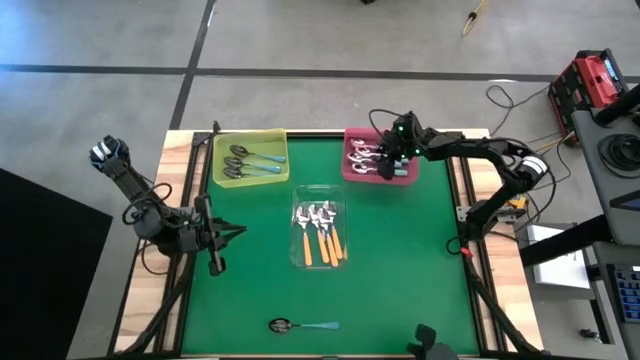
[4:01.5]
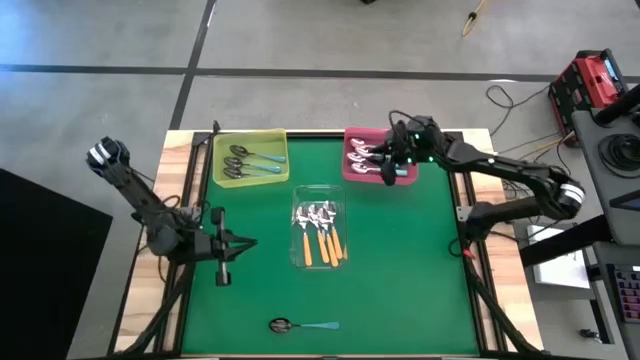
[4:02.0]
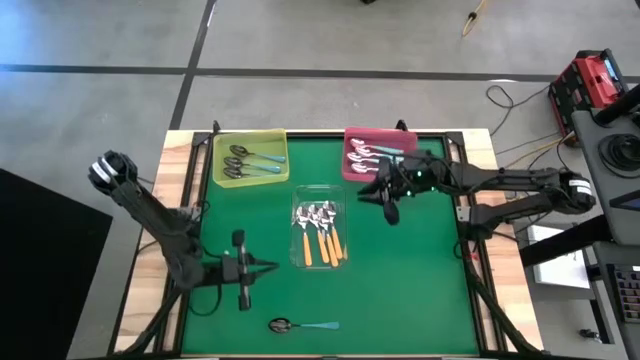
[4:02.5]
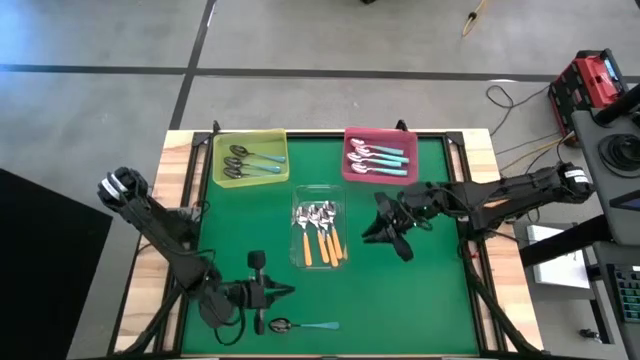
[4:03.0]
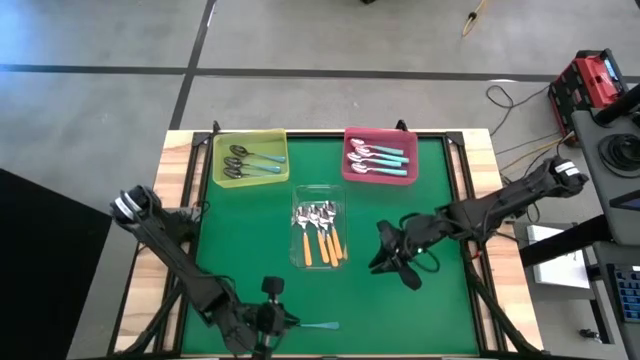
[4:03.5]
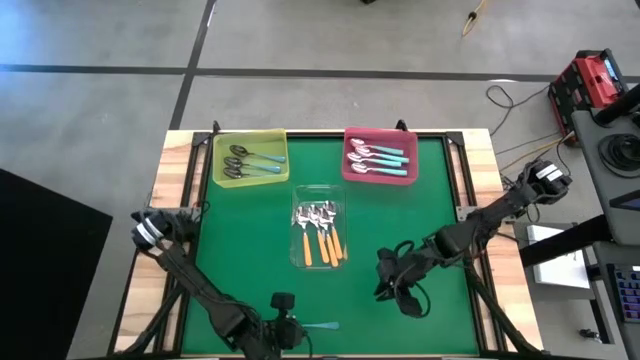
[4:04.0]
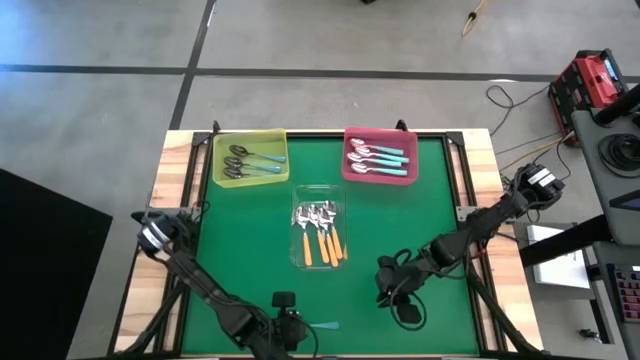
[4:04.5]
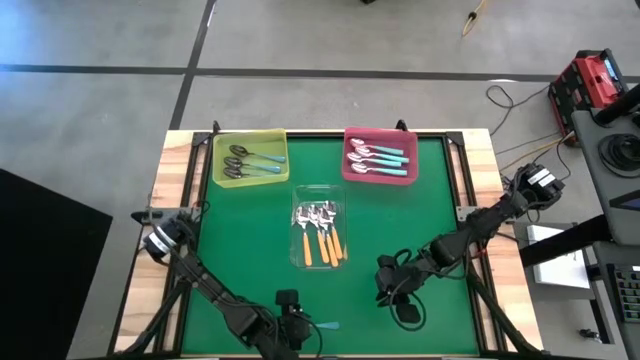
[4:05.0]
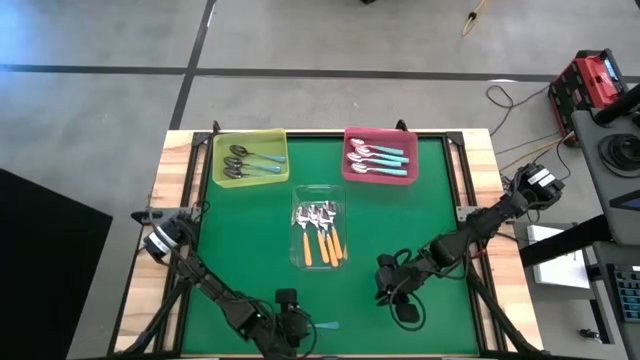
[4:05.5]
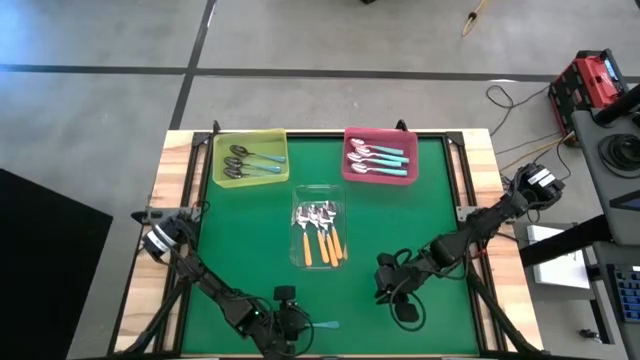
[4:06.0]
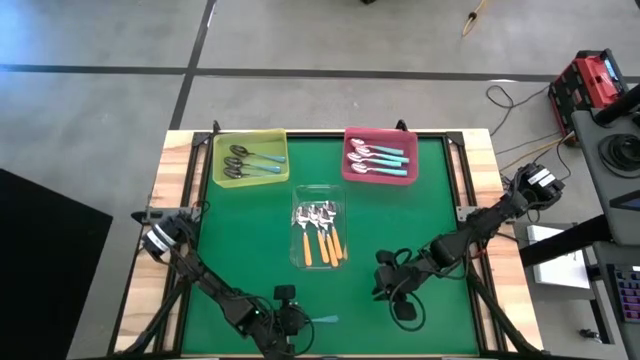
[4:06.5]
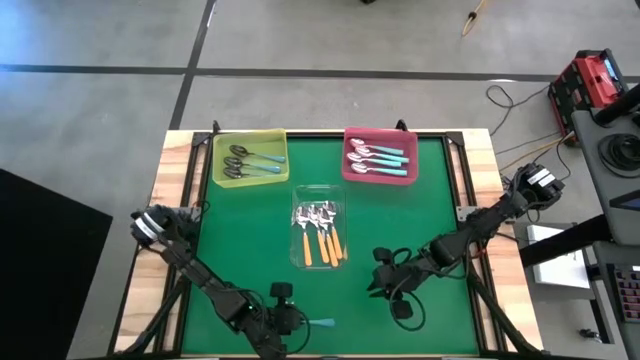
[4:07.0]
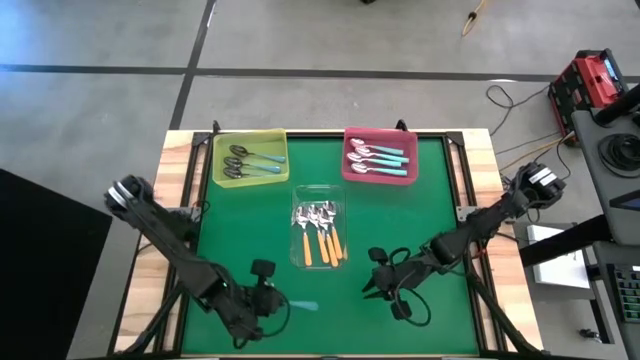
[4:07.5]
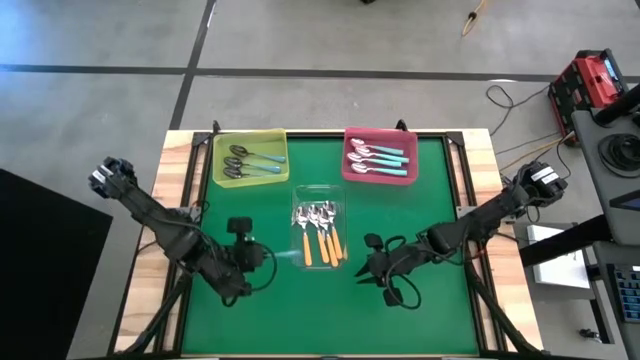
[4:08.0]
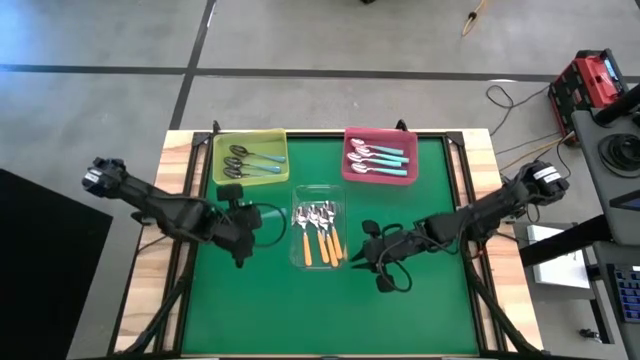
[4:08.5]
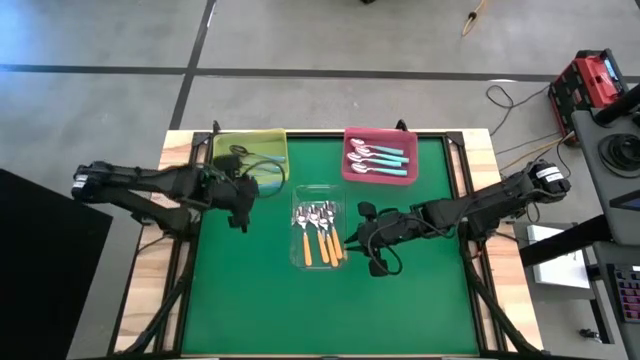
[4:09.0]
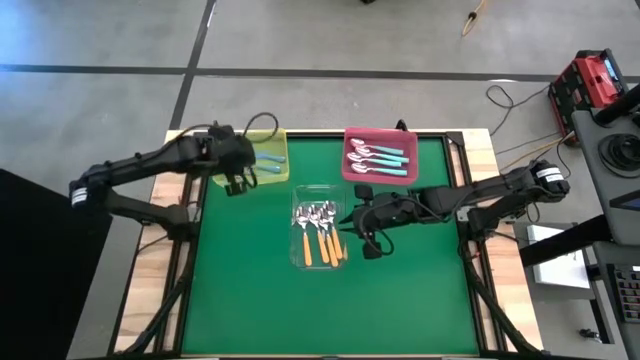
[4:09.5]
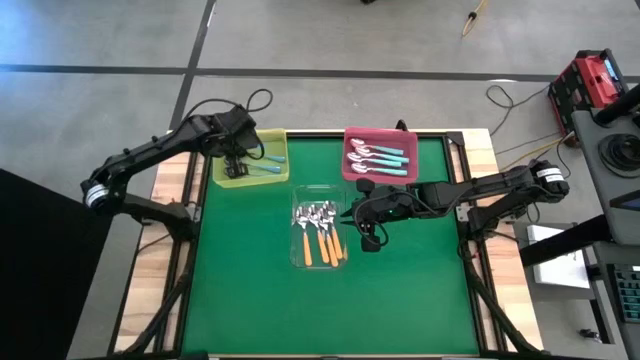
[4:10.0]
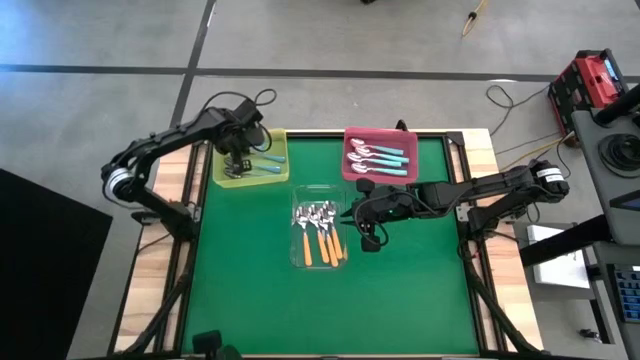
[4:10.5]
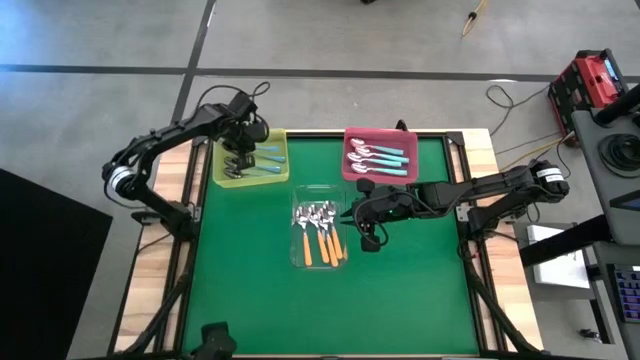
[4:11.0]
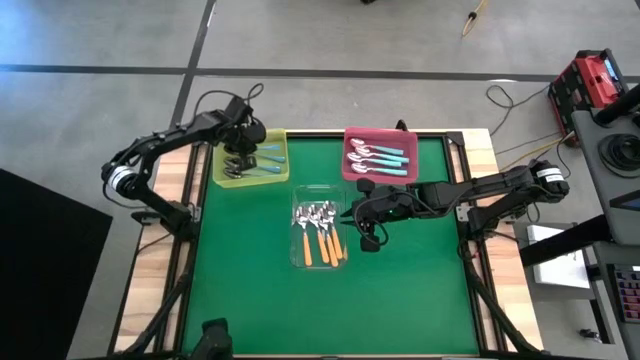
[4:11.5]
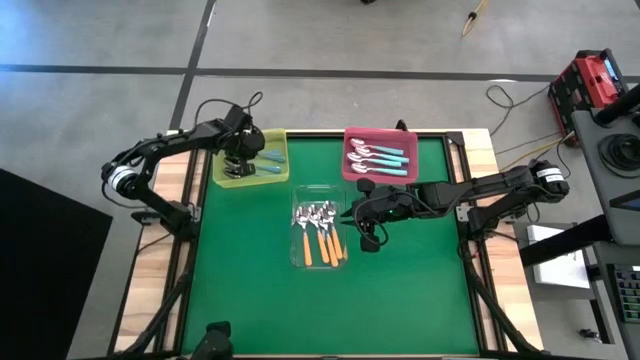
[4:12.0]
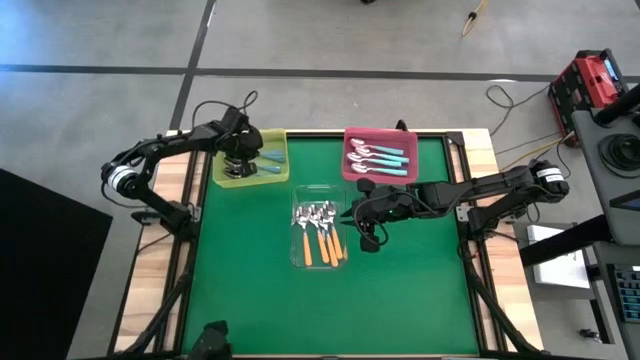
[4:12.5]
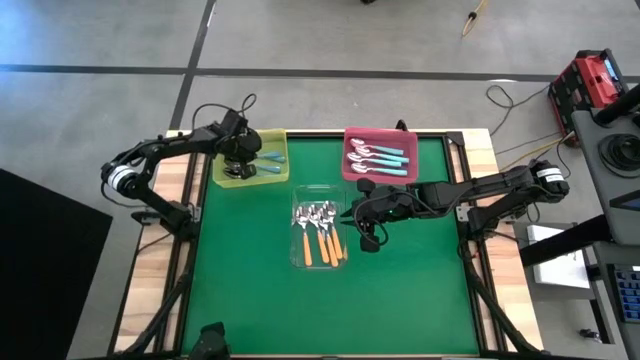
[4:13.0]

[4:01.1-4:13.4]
Task: Sort silverware by color (type)
Put the blue spoon into the yellow bin

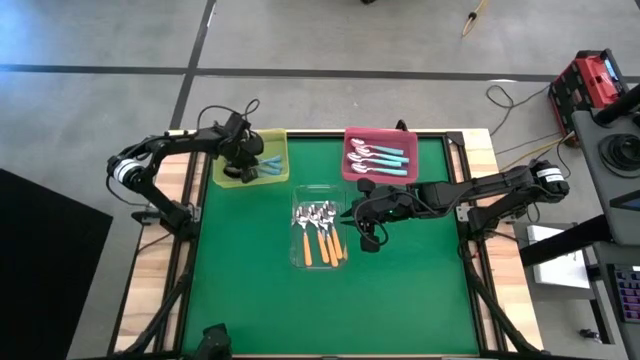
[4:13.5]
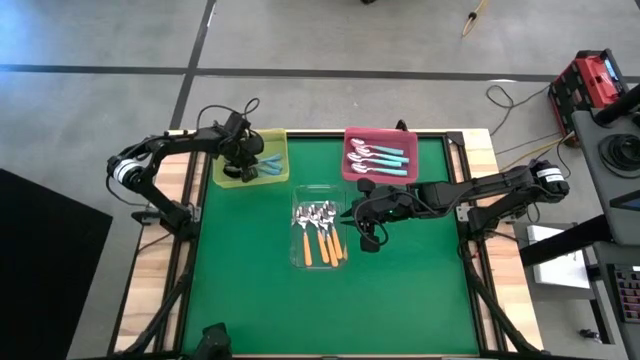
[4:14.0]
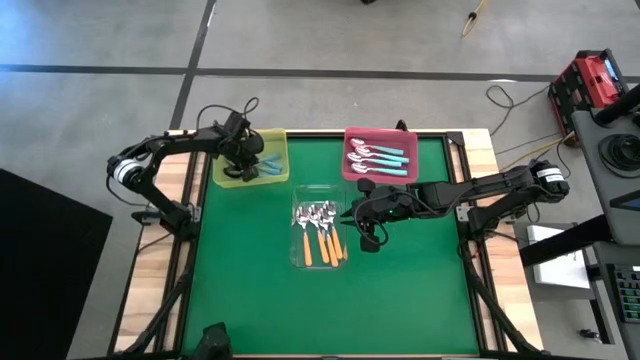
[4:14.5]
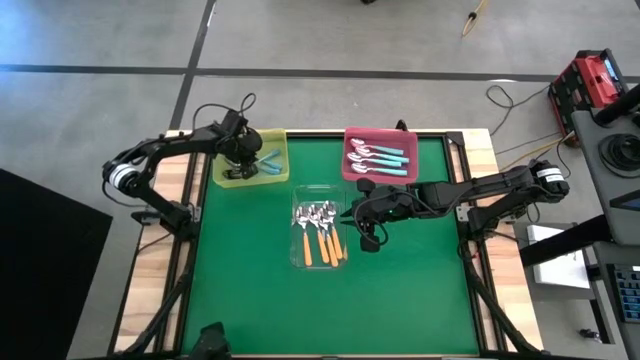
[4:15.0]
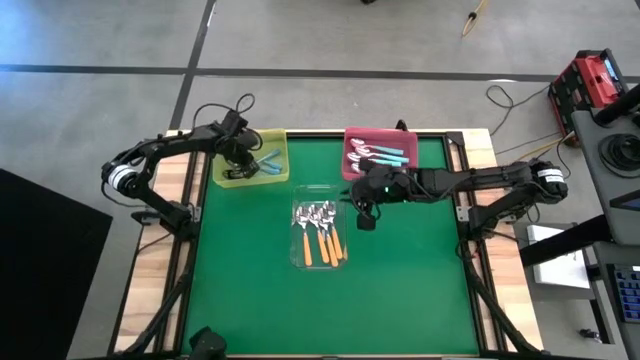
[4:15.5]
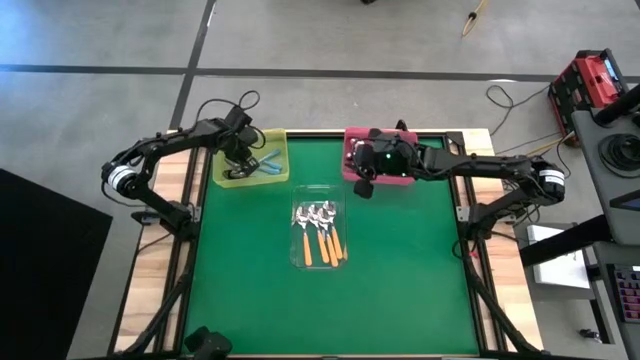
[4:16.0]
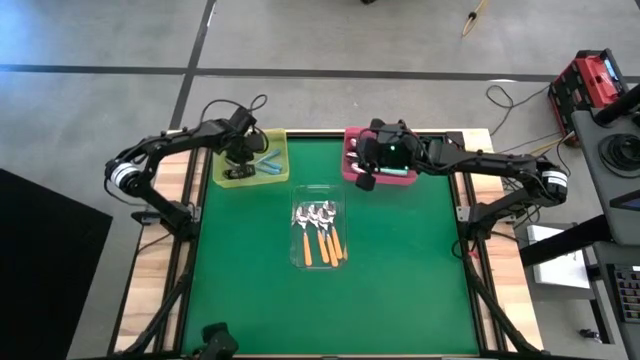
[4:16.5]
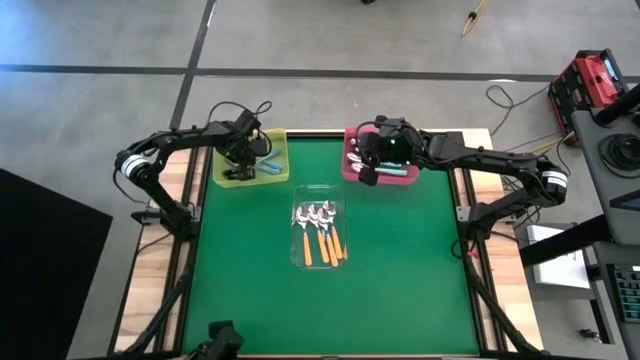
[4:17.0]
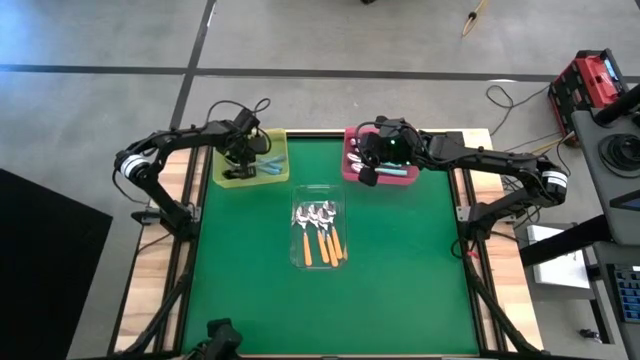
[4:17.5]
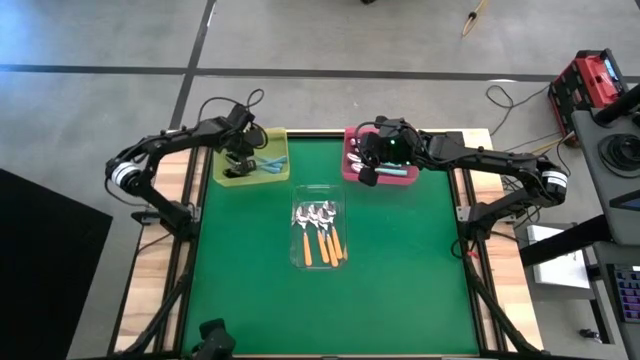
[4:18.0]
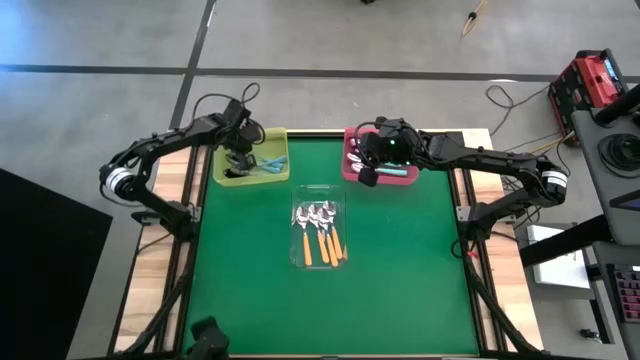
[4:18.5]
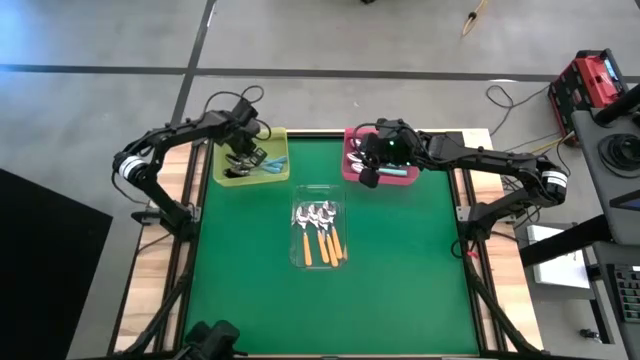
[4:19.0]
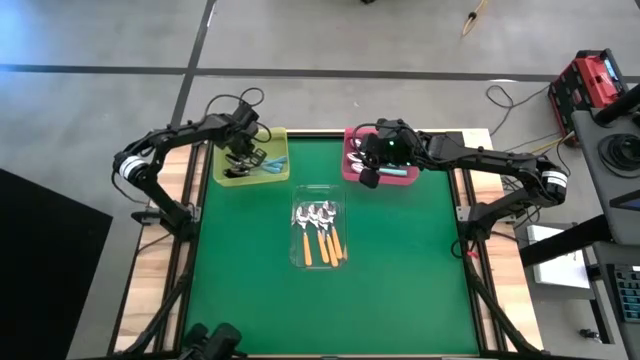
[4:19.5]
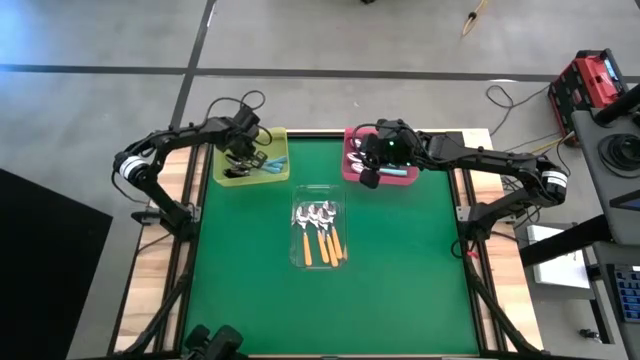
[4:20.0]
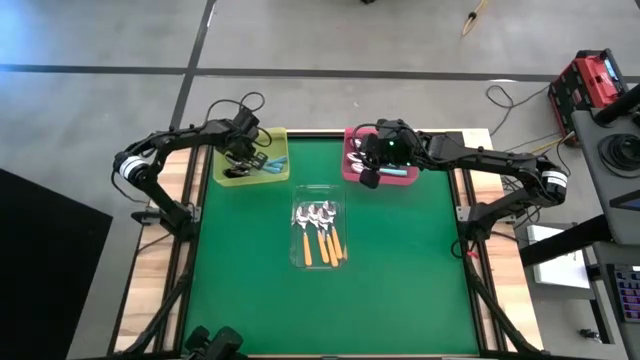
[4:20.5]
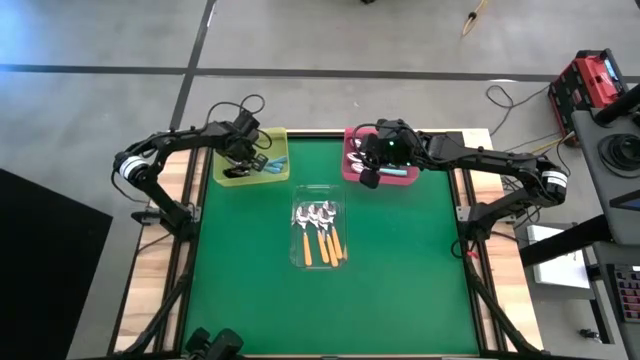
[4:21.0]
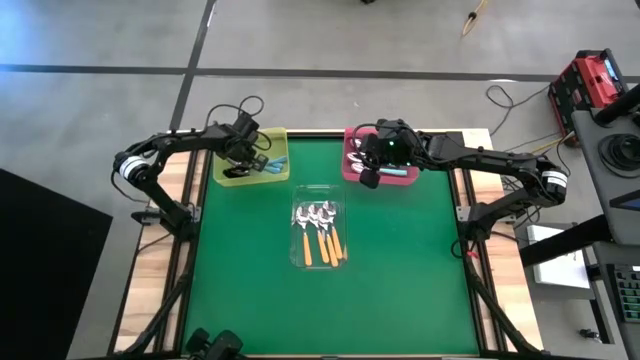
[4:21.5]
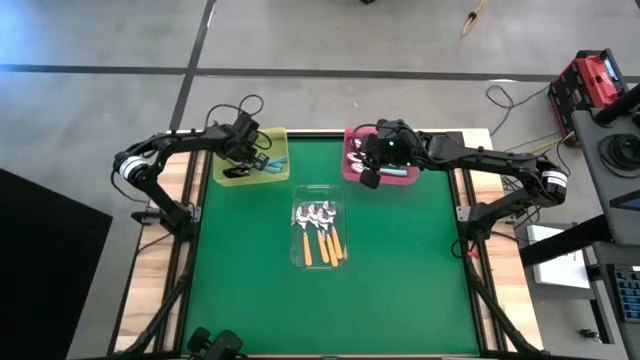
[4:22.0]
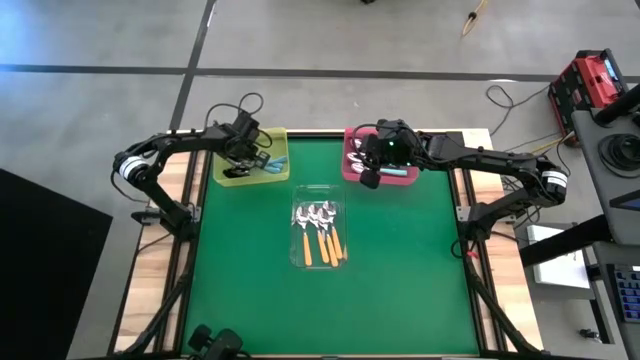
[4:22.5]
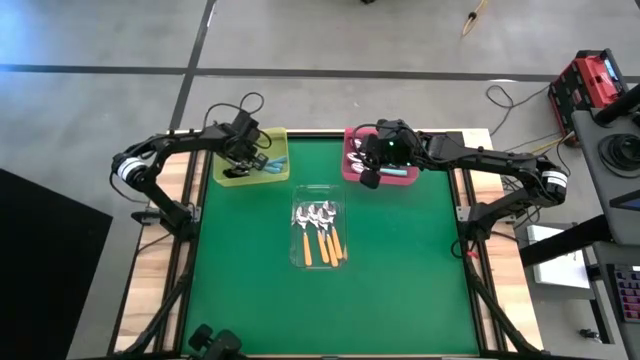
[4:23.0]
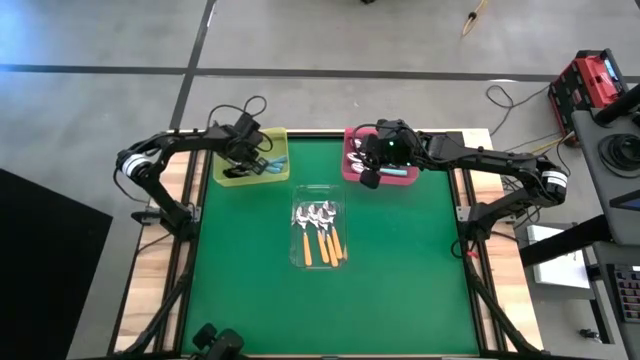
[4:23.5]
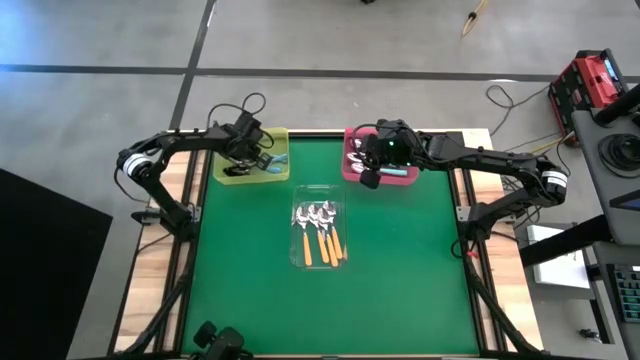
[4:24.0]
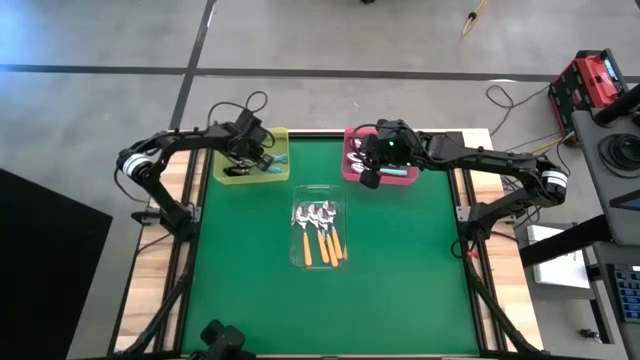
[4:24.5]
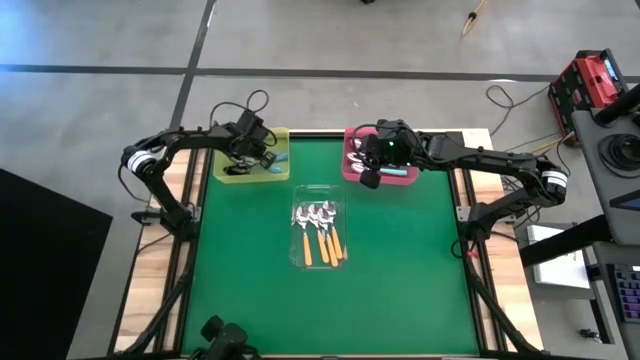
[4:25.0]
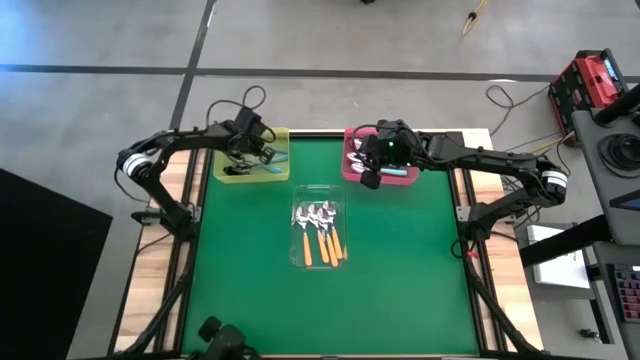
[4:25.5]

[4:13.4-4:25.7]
Put the blue spoon into the yellow bin
